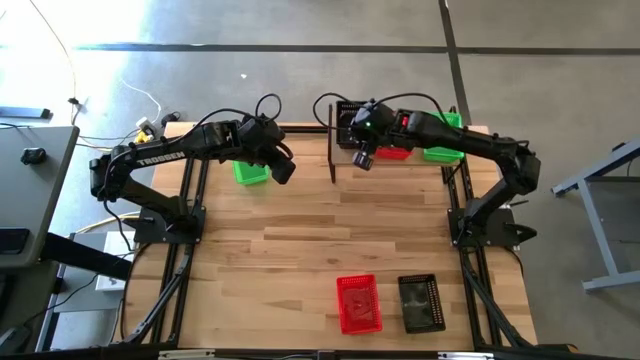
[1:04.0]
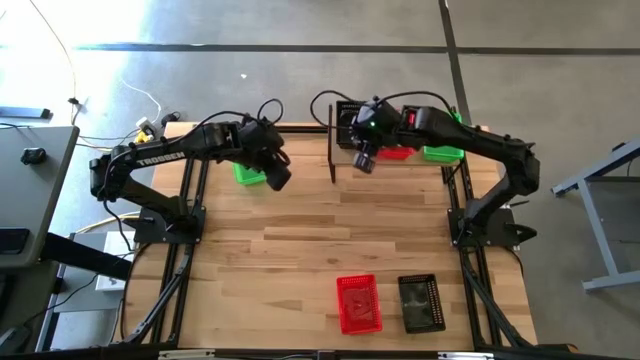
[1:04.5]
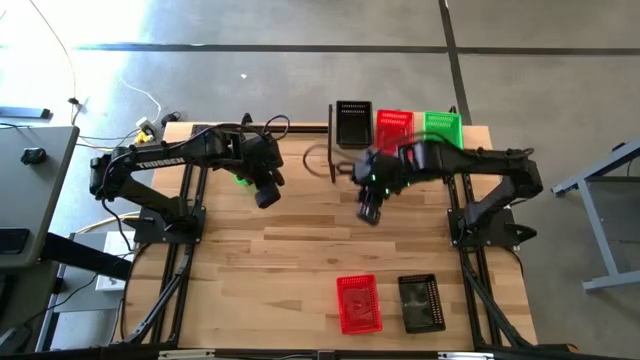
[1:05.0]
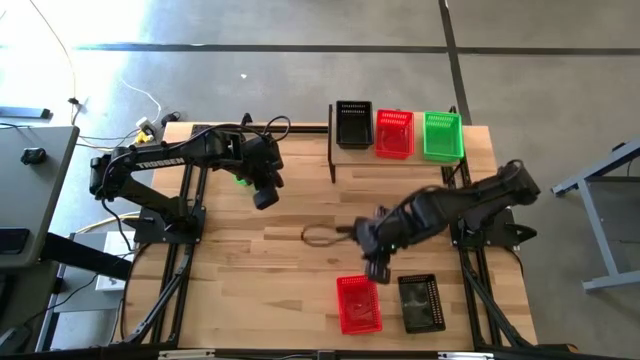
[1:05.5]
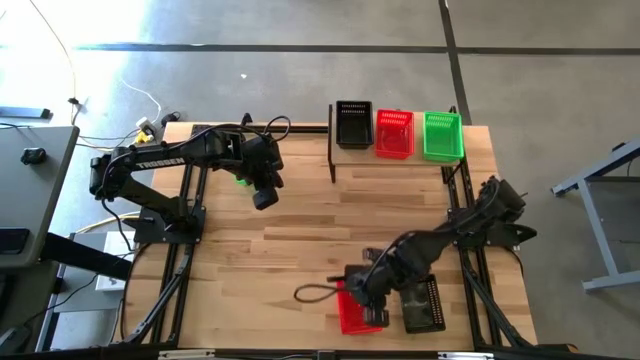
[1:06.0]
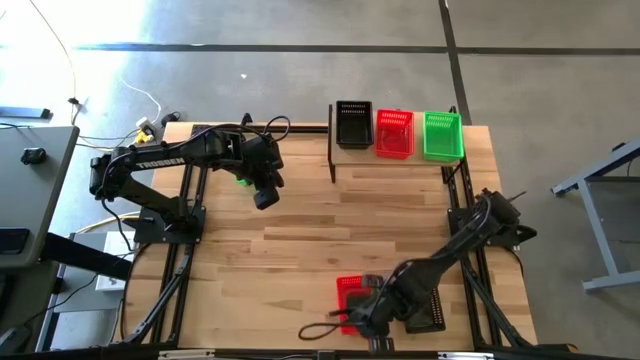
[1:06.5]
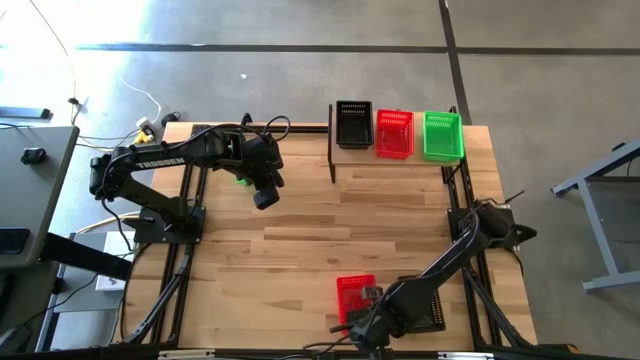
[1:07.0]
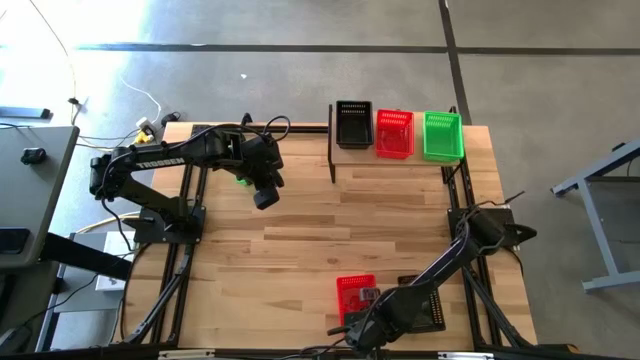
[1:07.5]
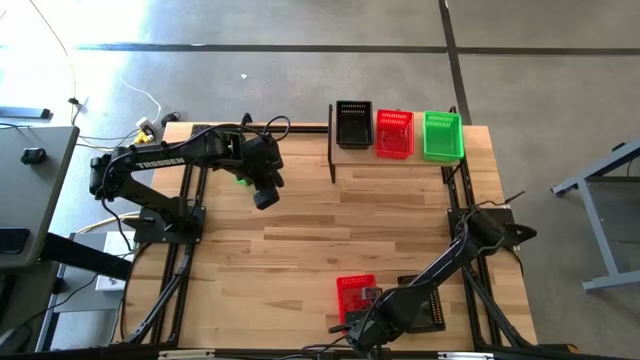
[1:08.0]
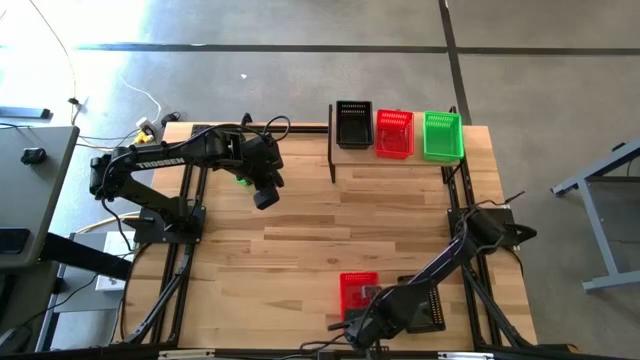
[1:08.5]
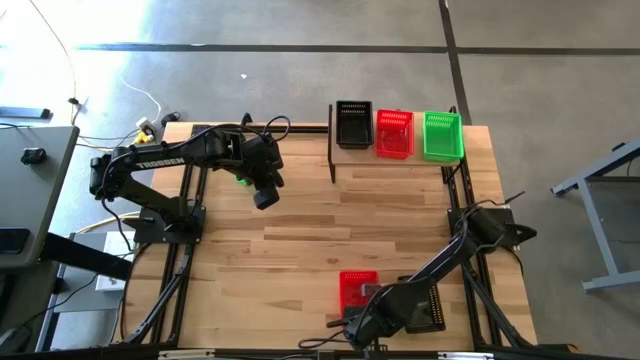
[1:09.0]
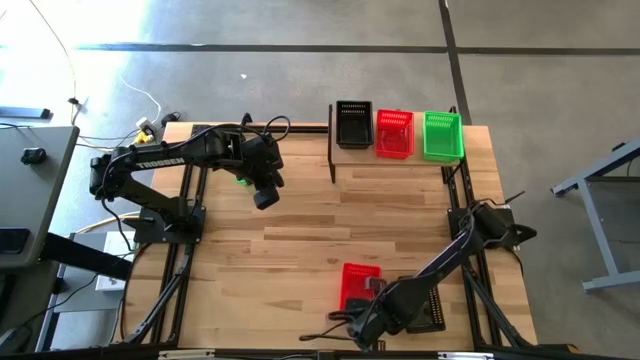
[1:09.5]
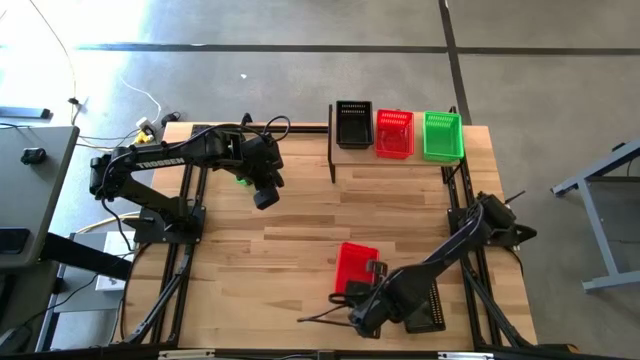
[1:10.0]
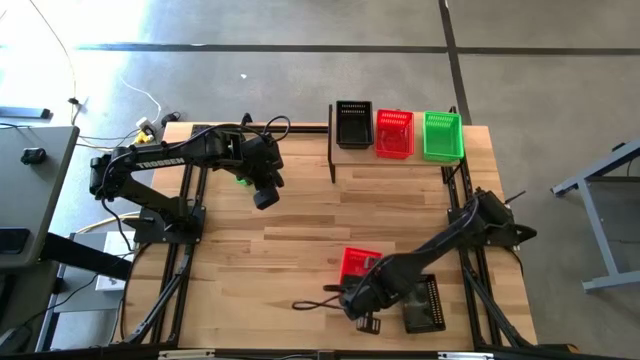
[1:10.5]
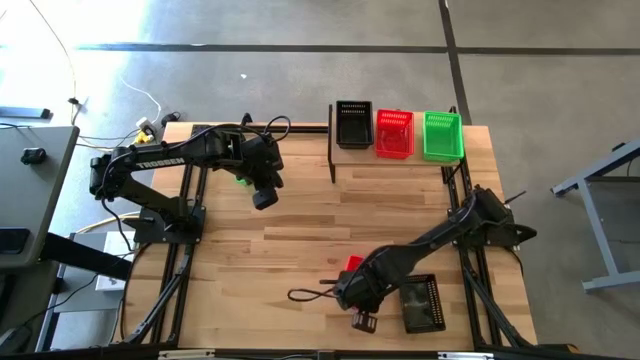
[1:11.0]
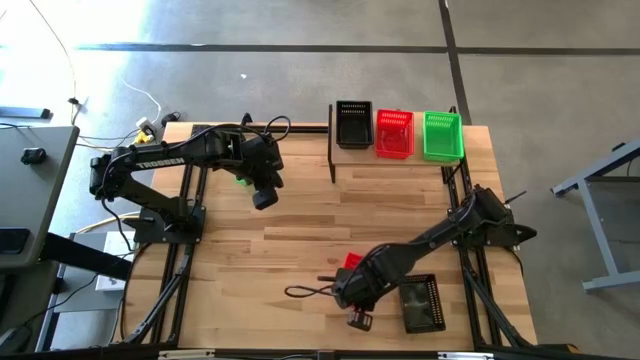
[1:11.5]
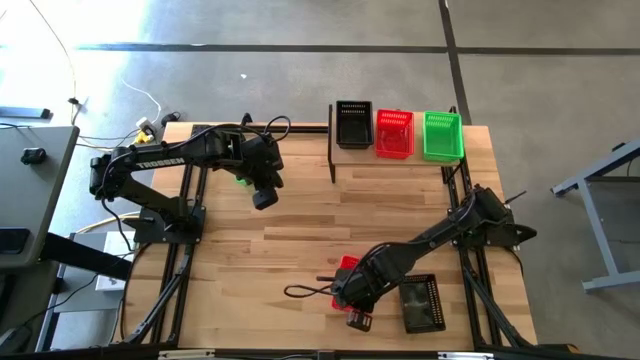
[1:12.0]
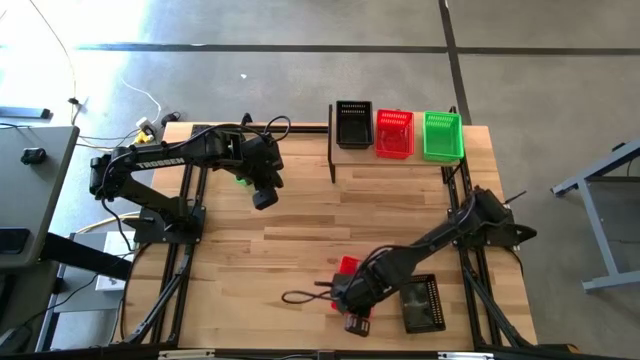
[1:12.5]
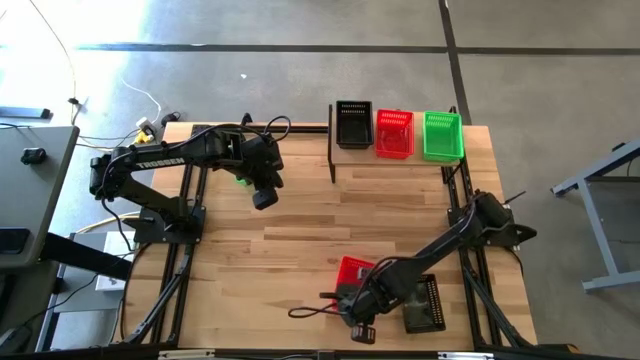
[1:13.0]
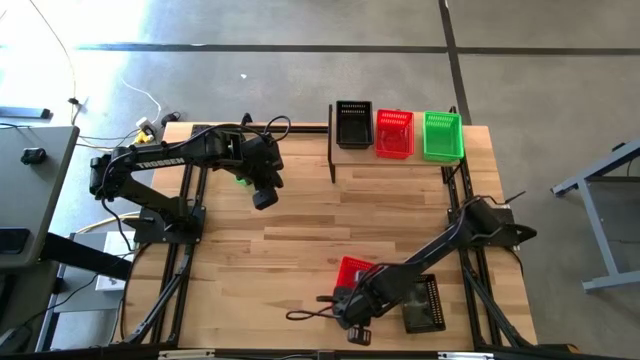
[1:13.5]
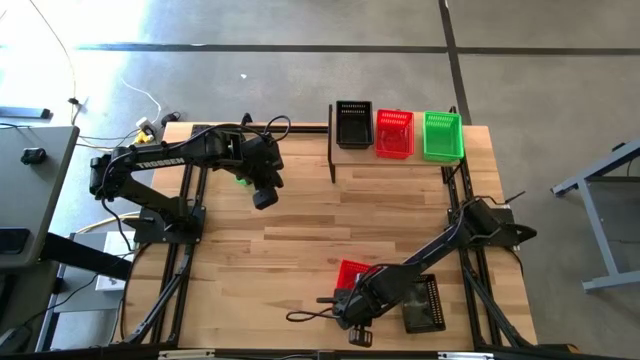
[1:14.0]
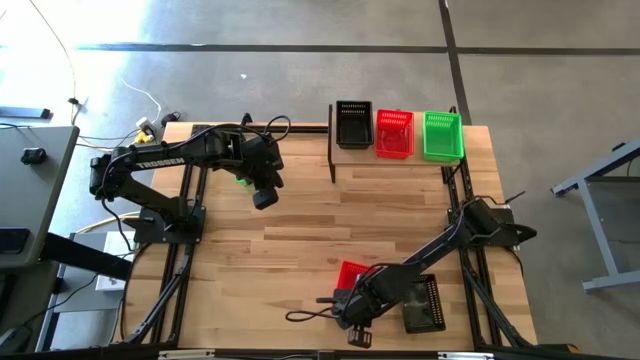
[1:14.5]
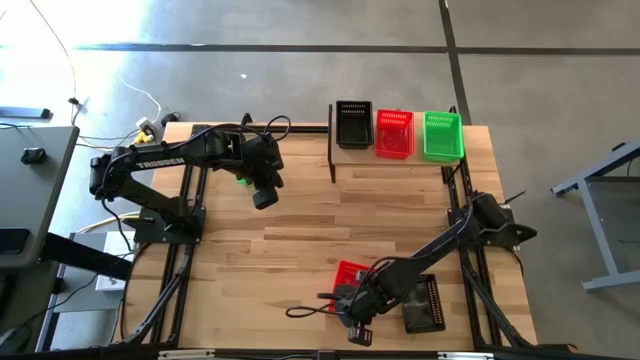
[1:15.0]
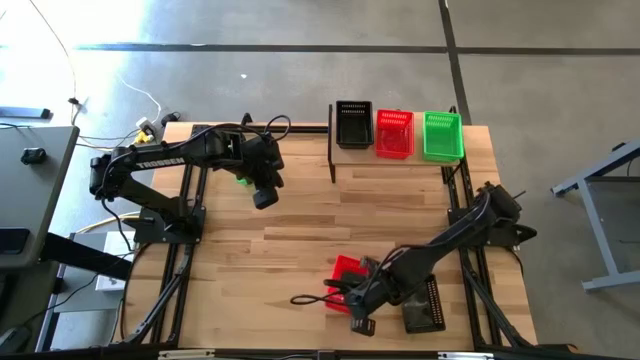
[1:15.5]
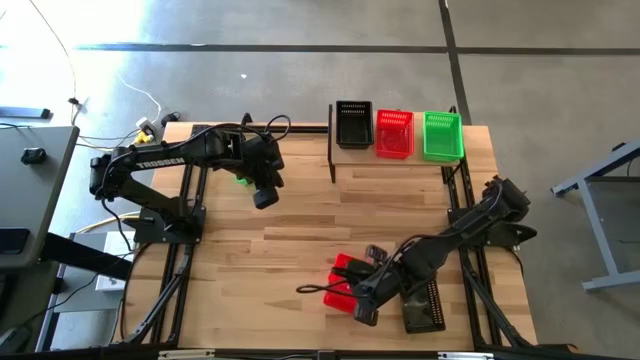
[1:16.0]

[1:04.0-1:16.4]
Task: Stack baskets on shelf by color
Stack the red bin on top of the red bin on the shelf

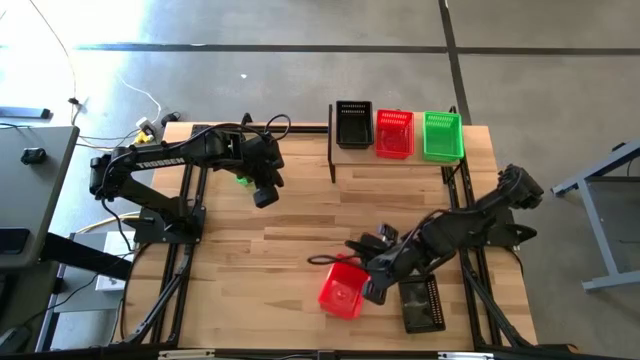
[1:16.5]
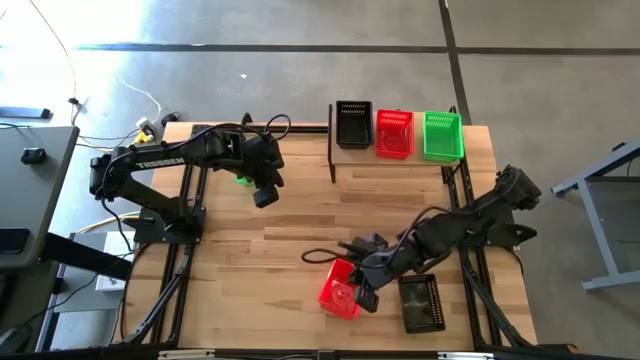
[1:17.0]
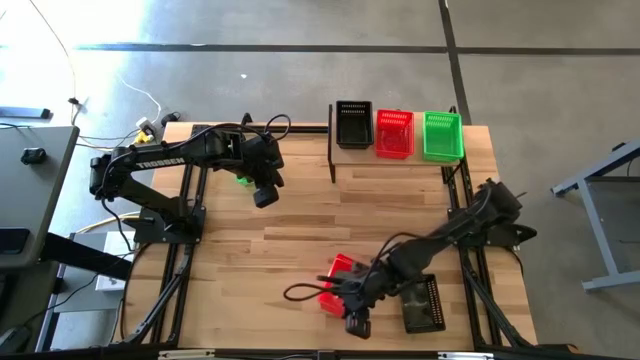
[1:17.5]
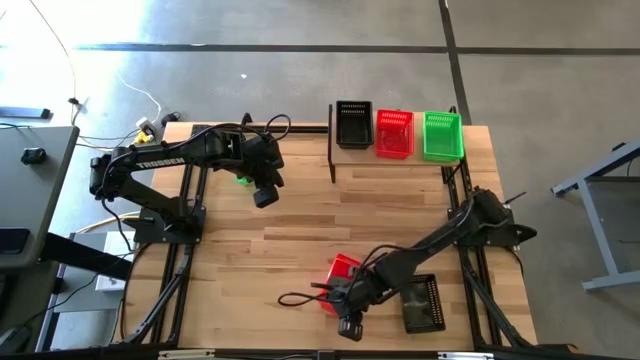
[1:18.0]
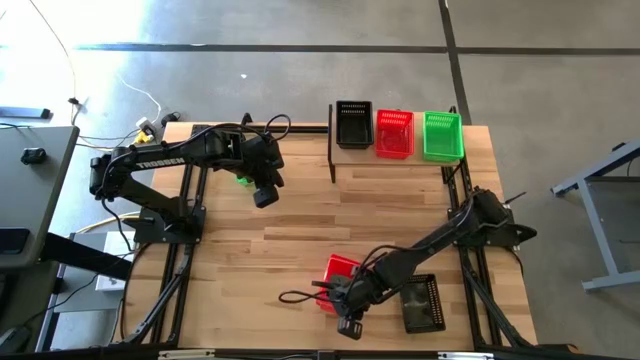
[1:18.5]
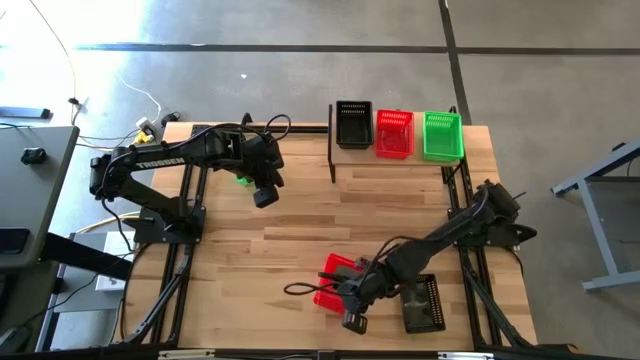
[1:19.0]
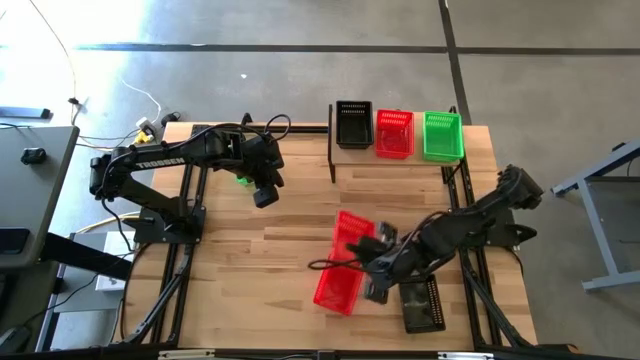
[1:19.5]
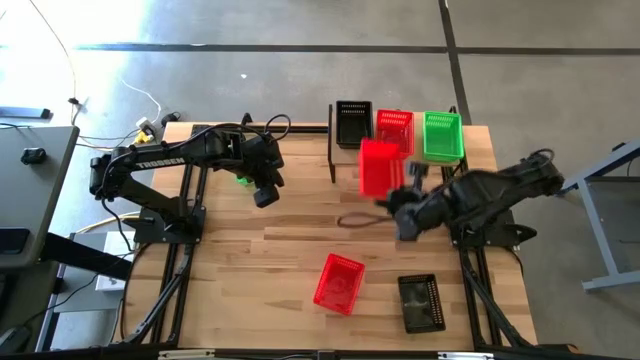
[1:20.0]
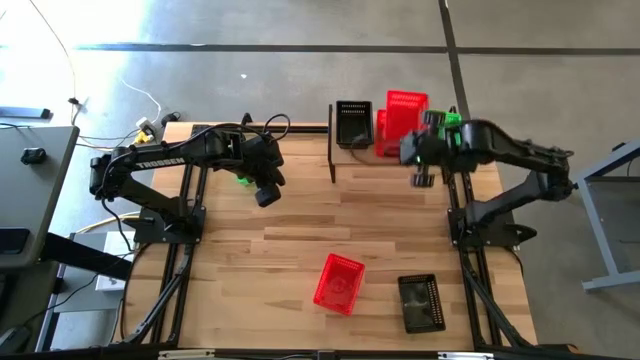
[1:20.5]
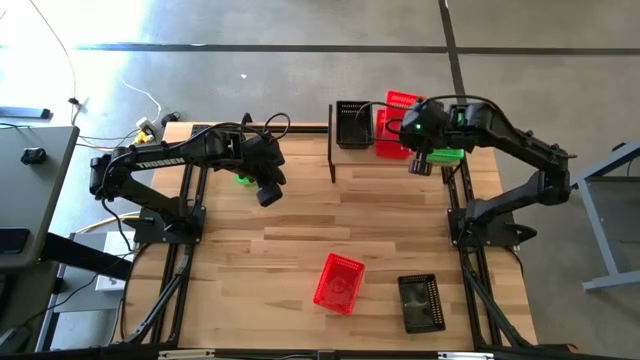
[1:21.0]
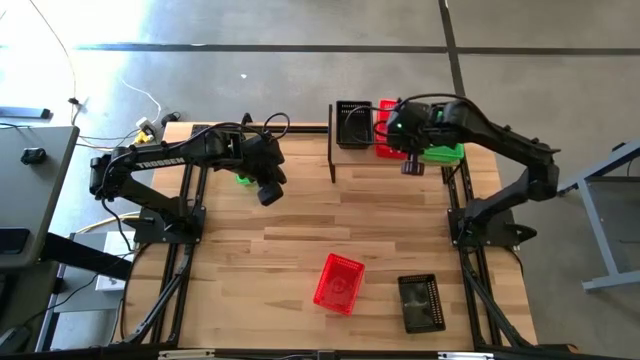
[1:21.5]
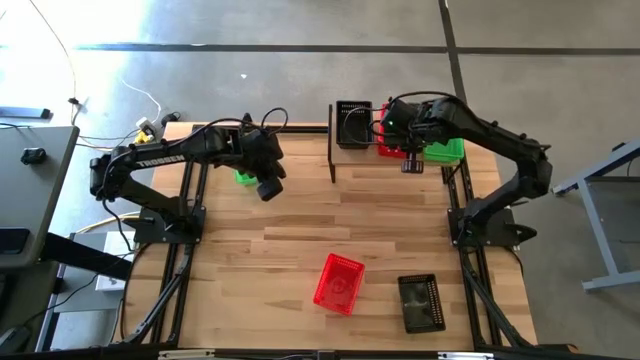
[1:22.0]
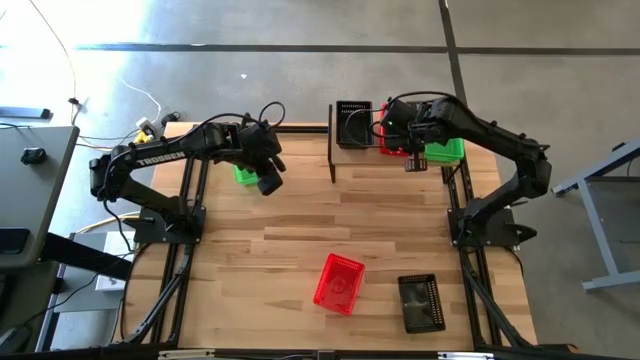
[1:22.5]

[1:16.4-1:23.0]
Stack the red bin on top of the red bin on the shelf

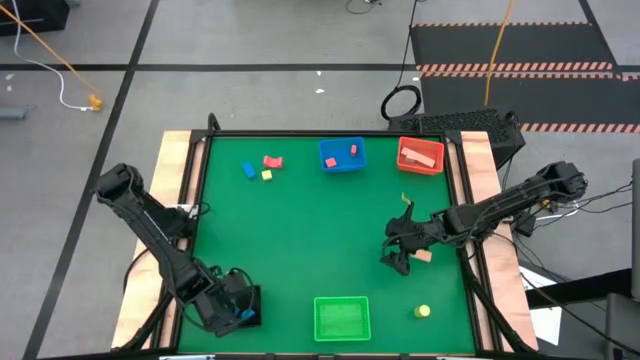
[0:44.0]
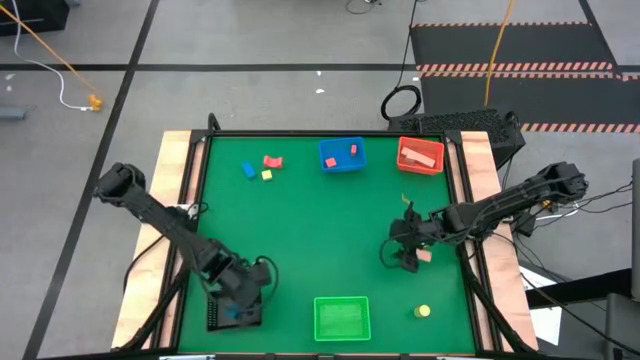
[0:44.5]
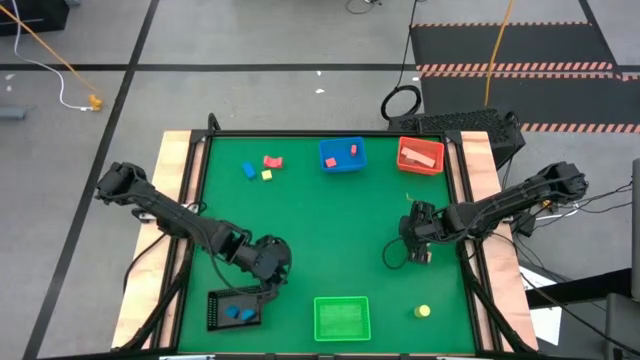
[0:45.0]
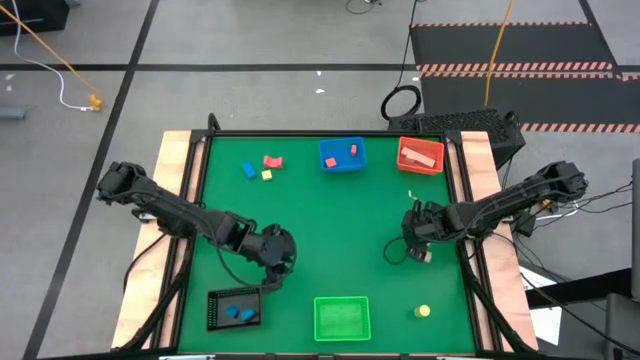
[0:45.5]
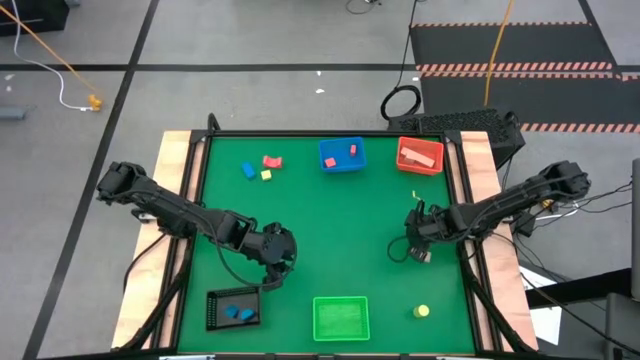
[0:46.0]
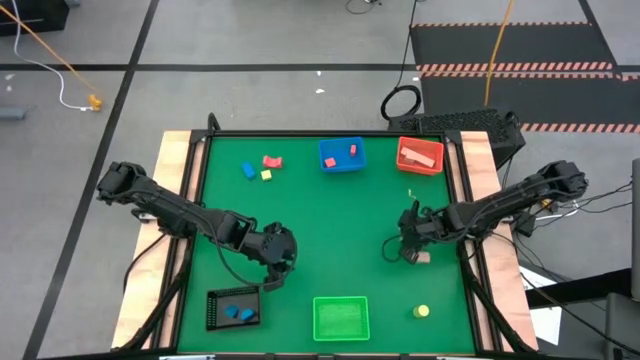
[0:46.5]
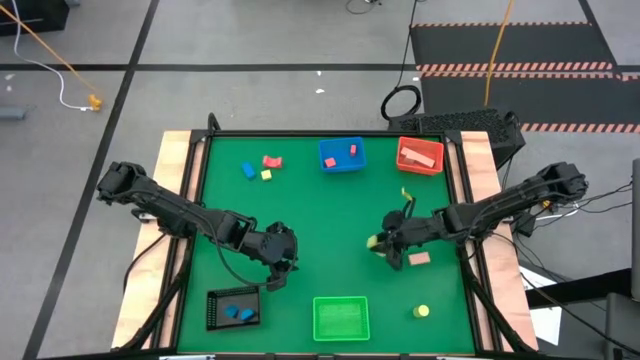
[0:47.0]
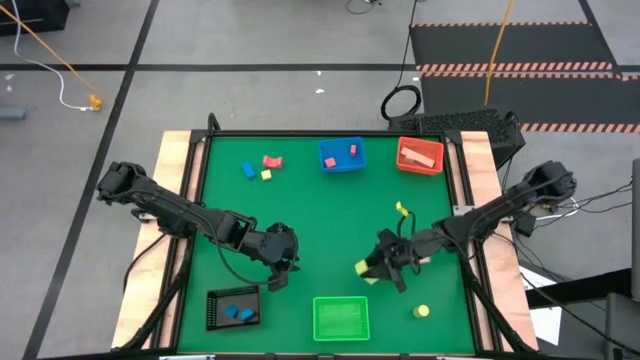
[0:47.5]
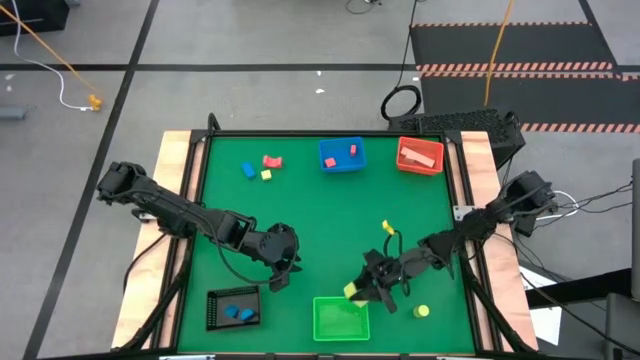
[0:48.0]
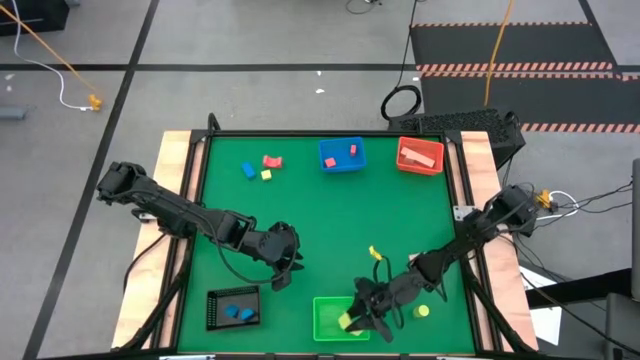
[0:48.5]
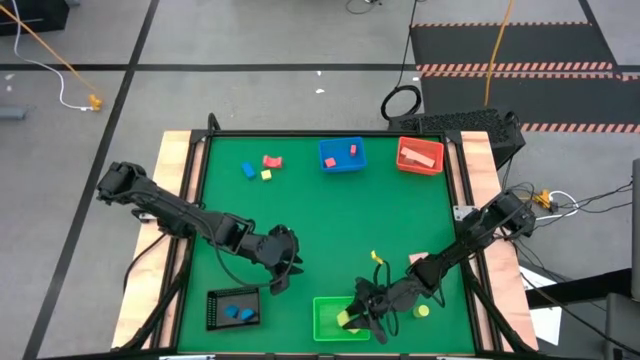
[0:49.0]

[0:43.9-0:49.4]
Task: Sort & place blocks by color
Put the green block into the green bin
